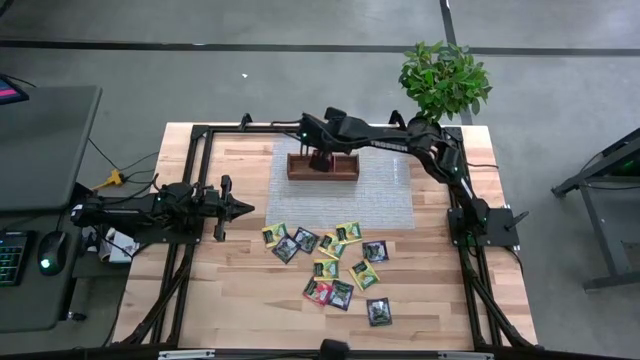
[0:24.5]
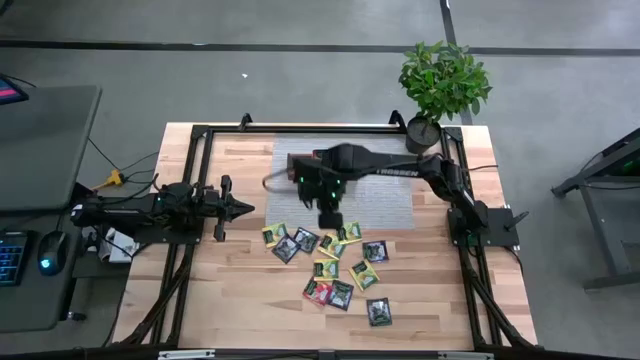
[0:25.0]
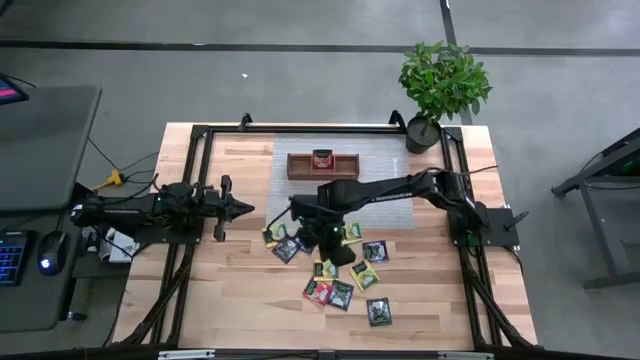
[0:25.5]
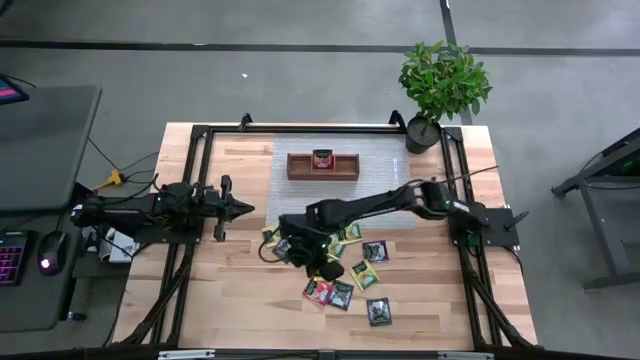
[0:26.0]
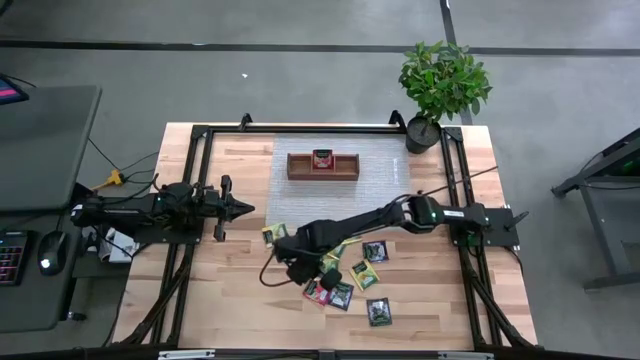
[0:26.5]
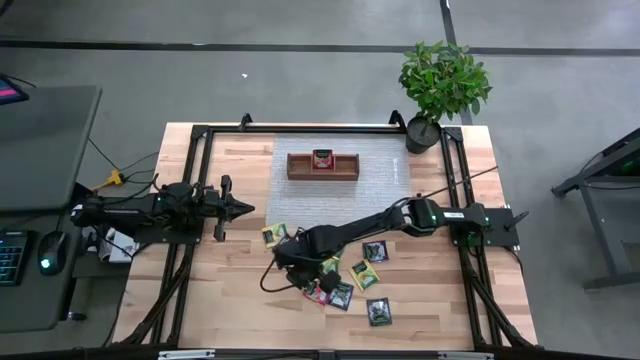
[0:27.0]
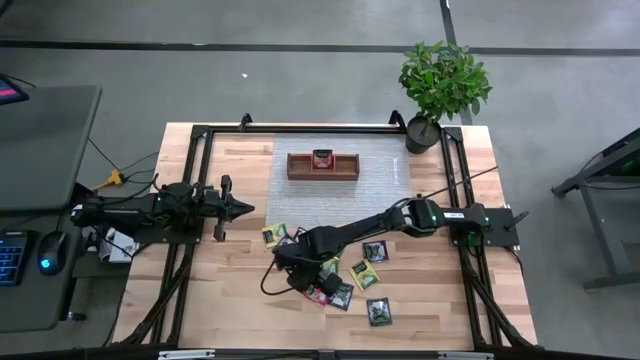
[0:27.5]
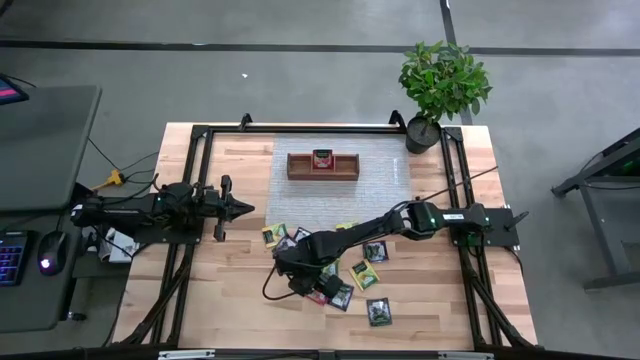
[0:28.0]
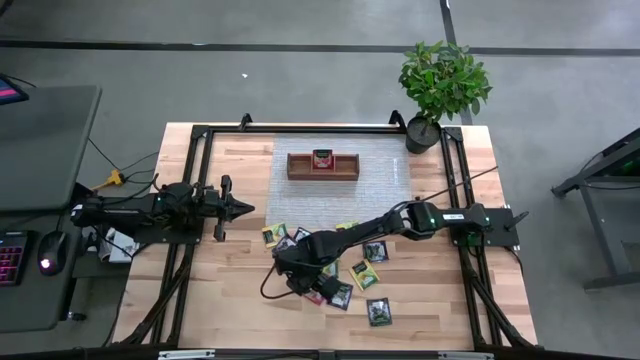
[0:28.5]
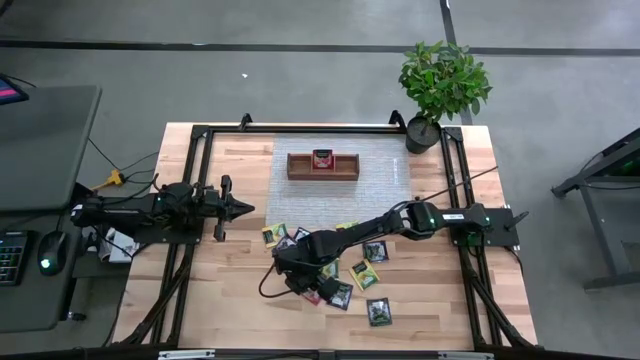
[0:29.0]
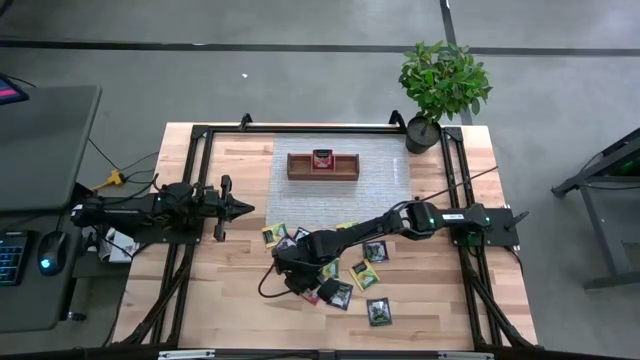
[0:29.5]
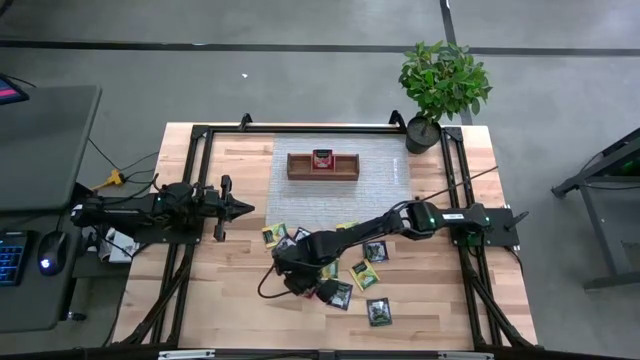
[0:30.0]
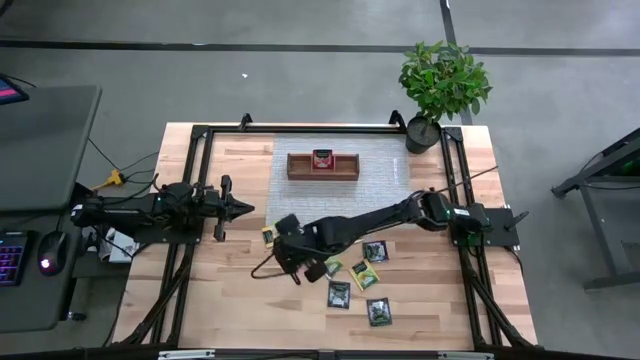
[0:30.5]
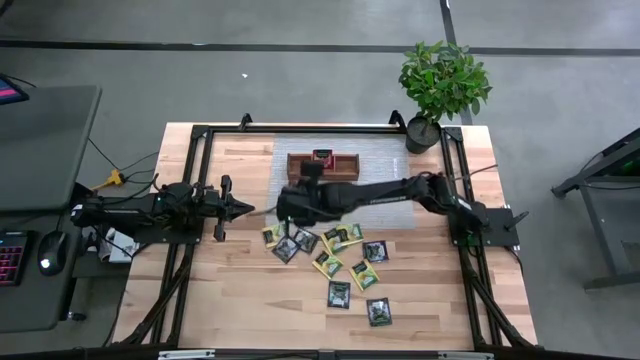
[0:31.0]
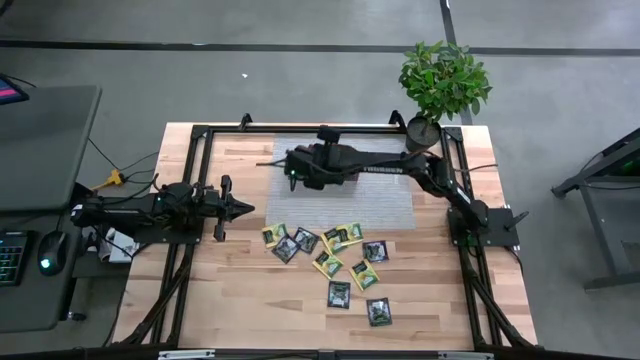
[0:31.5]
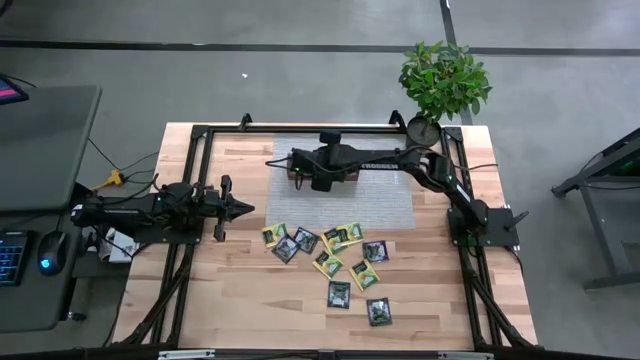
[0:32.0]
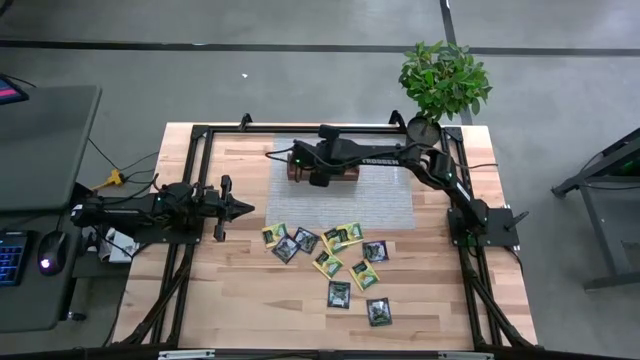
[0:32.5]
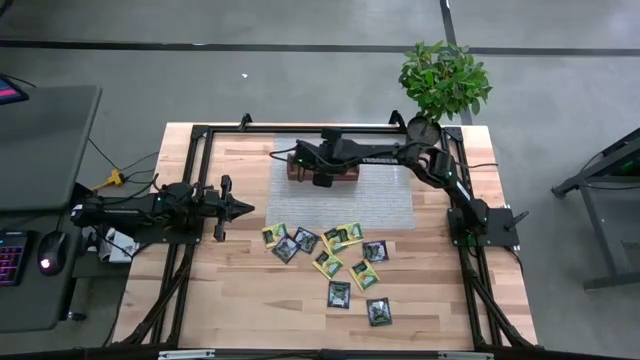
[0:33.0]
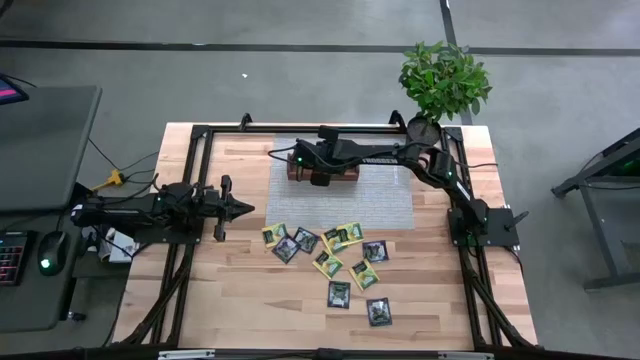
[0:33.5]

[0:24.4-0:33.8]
Task: Pick & Place Tea
Put the red tea bag into the middle section of the wooden organizer

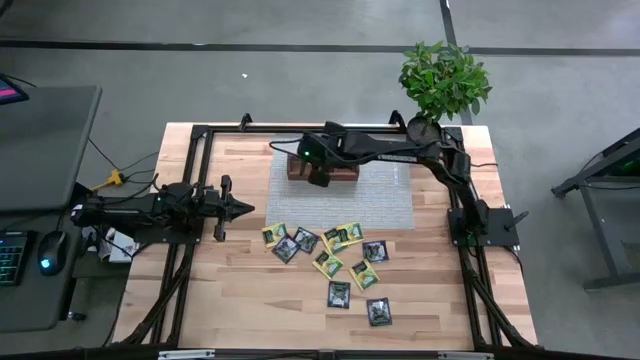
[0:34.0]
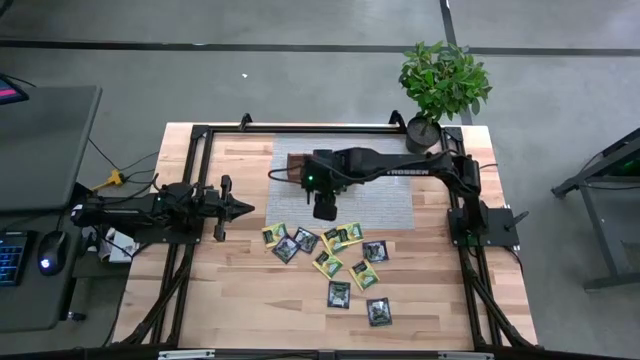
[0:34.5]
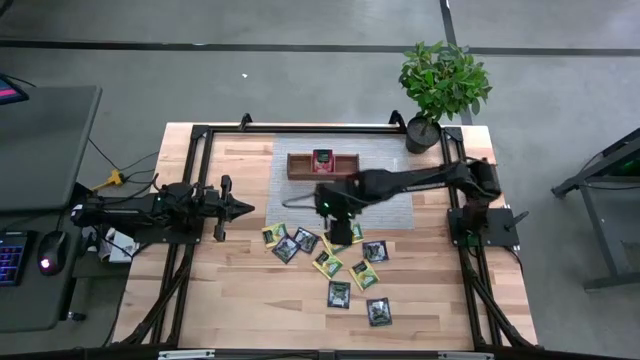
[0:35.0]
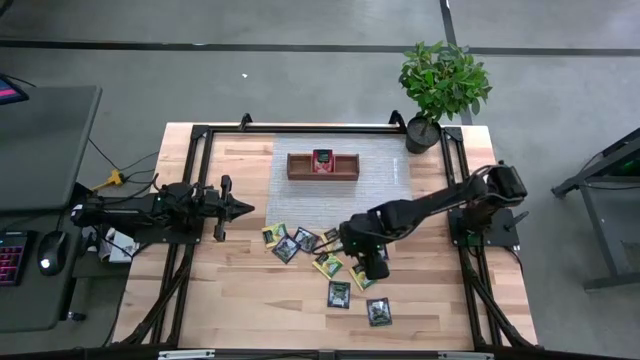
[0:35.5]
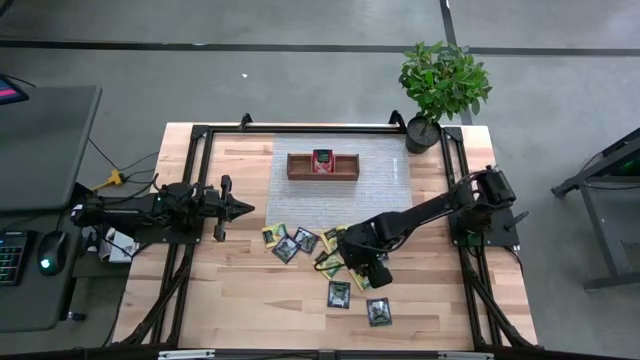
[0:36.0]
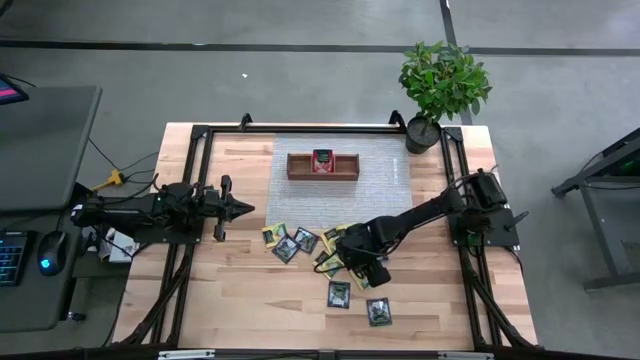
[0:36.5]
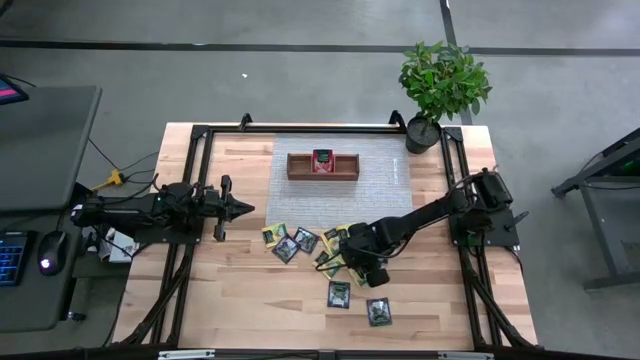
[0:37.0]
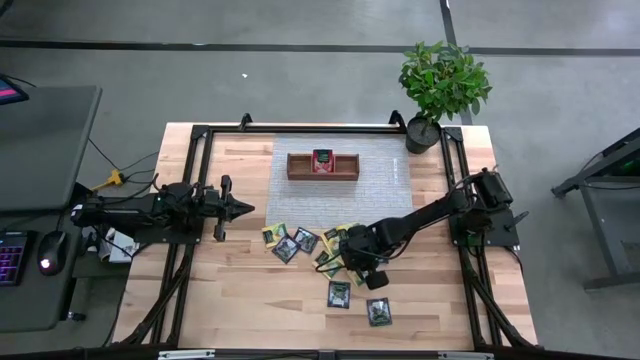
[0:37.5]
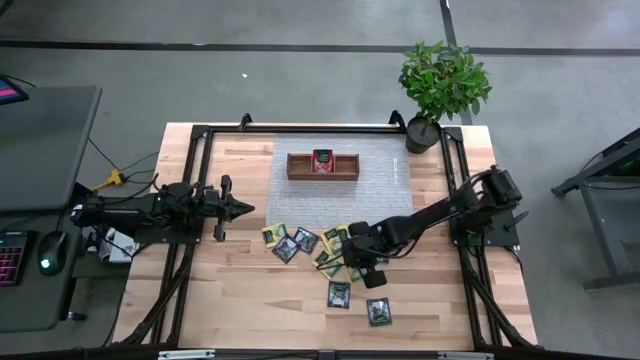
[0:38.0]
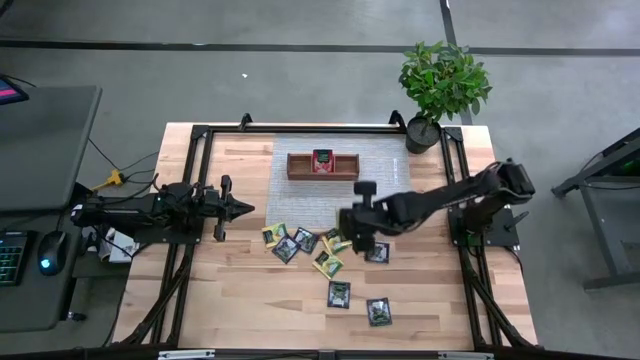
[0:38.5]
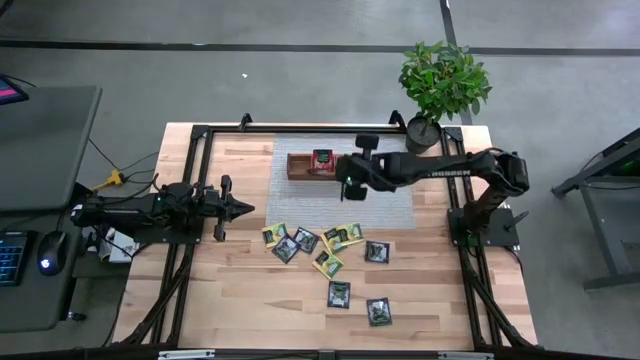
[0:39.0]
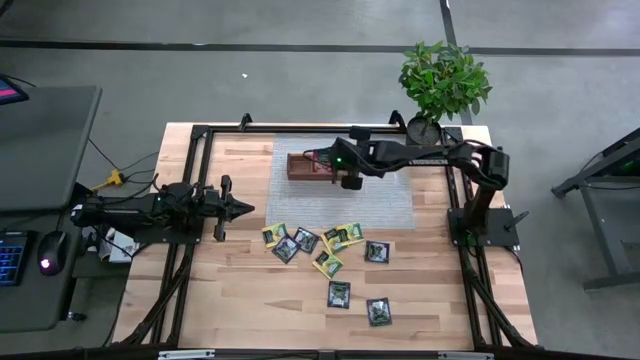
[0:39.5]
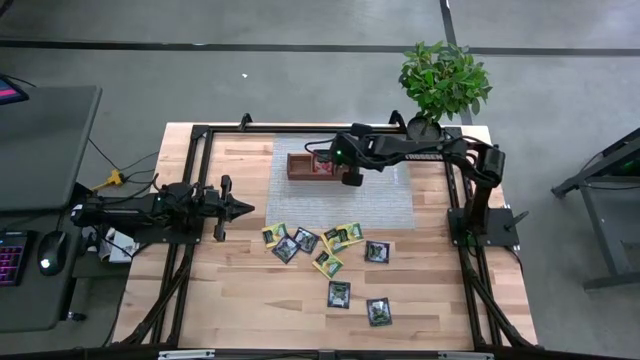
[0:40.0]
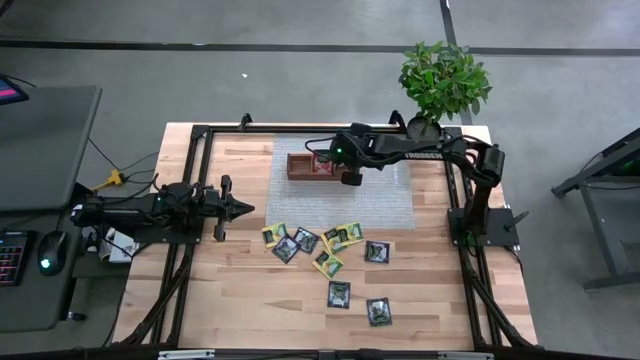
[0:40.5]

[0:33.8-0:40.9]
Put the yellow tea bag into the right section of the wooden organizer

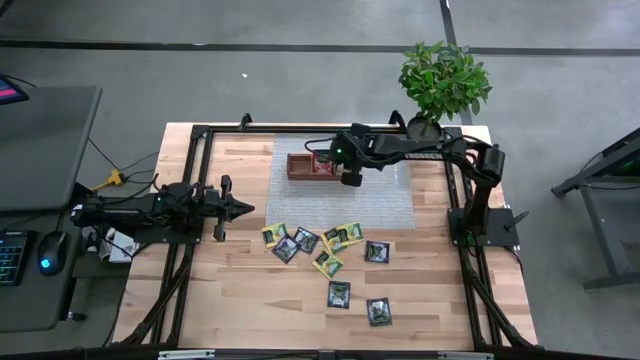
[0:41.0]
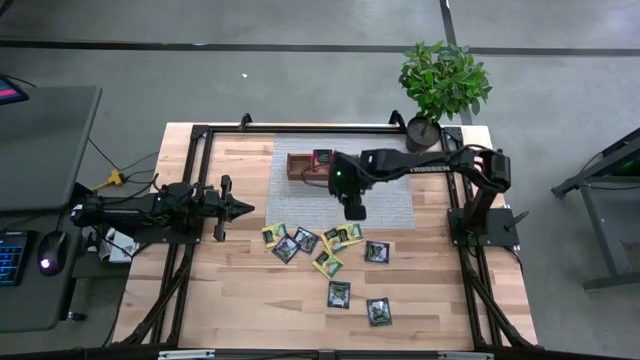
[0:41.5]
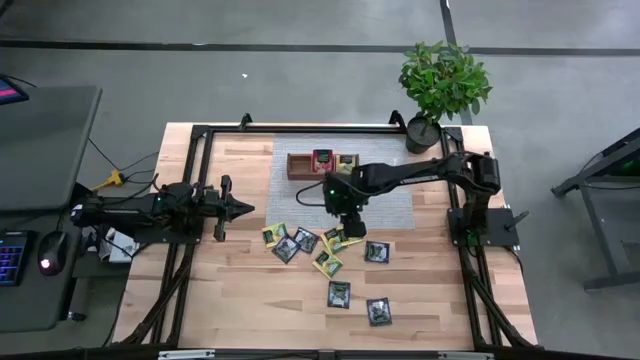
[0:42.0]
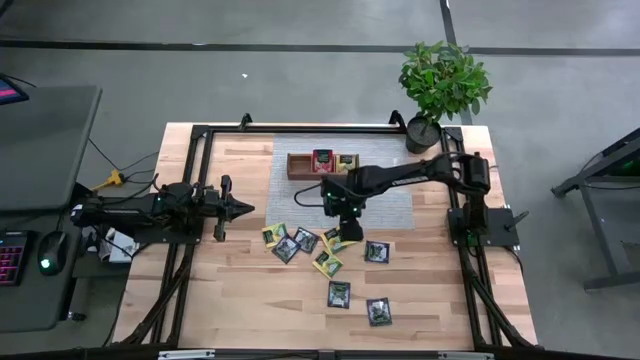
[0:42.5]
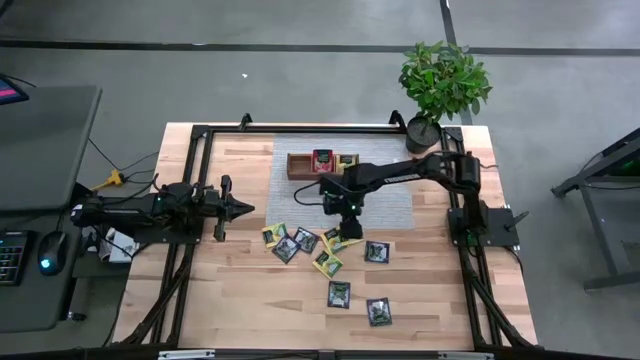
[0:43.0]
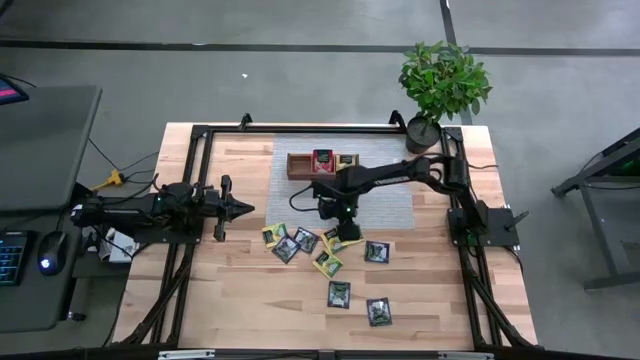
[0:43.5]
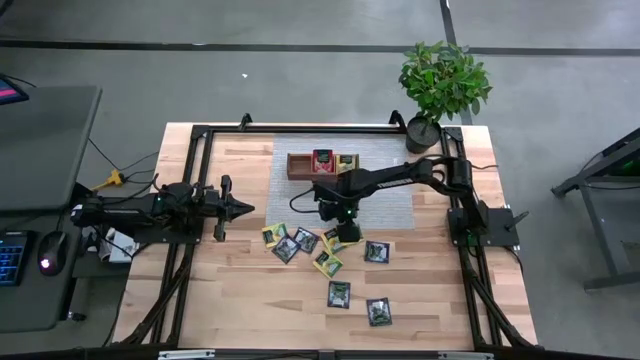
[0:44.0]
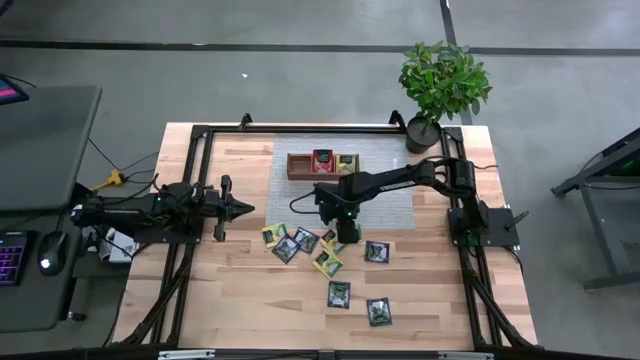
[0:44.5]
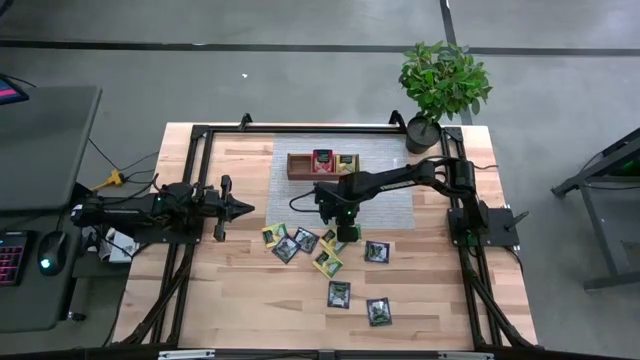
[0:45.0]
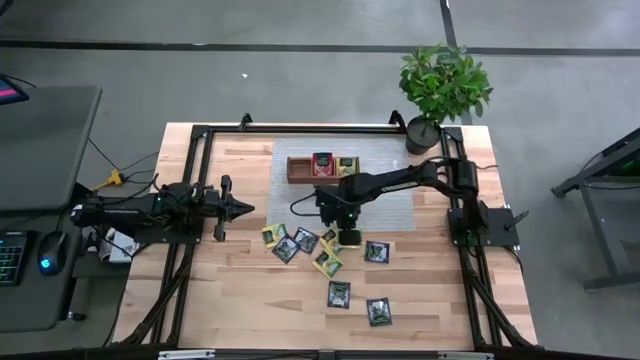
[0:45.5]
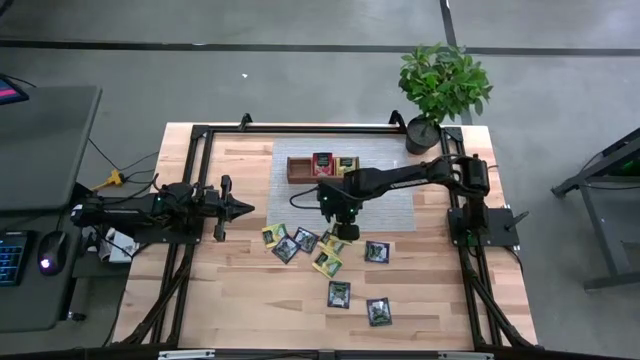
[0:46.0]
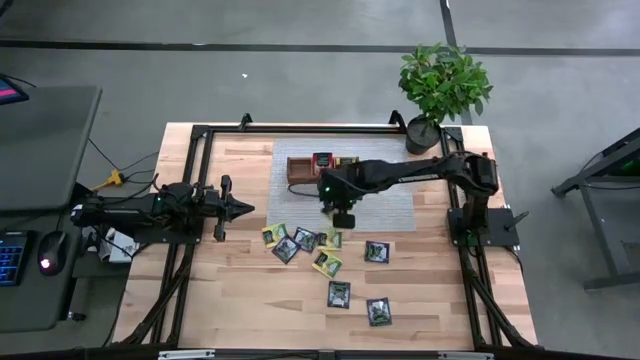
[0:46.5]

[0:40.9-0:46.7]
Put the yellow tea bag into the right section of the wooden organizer
